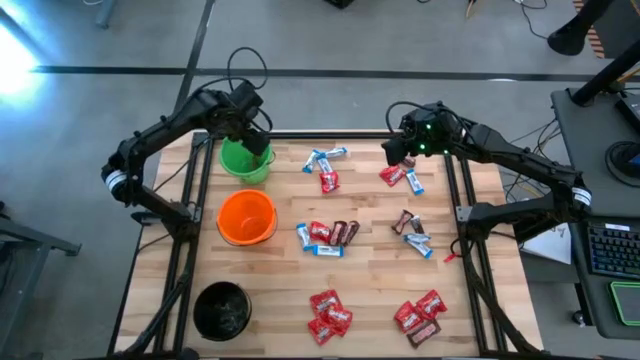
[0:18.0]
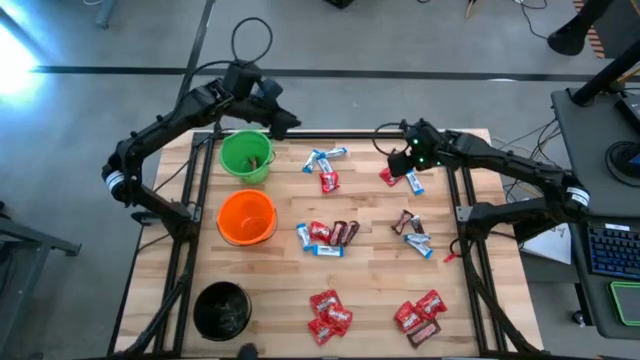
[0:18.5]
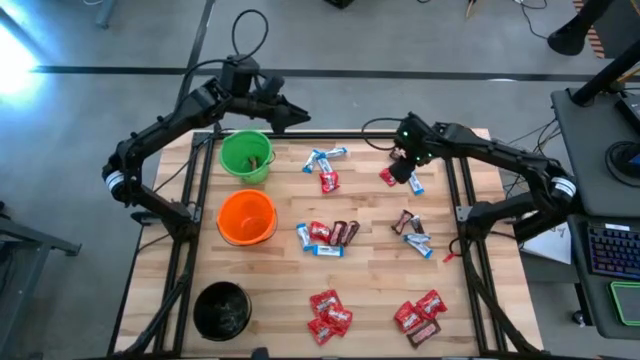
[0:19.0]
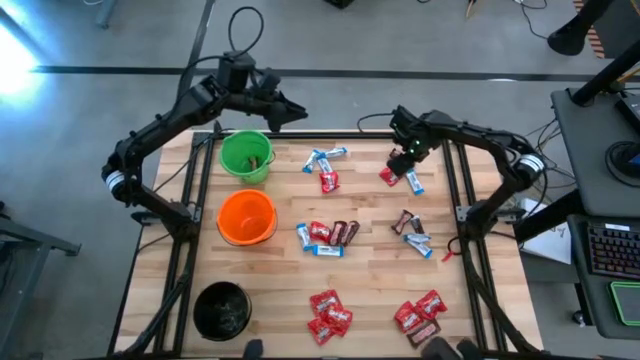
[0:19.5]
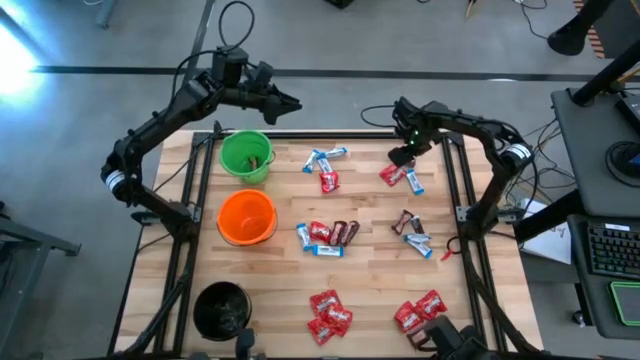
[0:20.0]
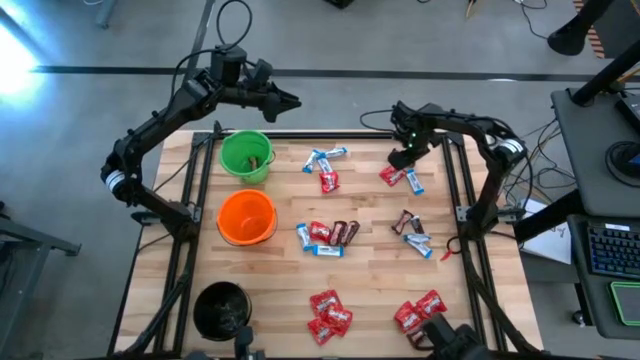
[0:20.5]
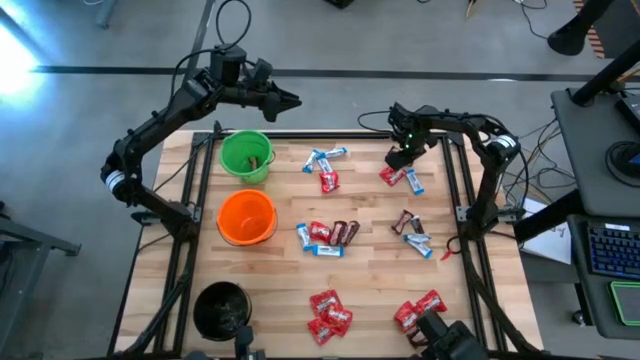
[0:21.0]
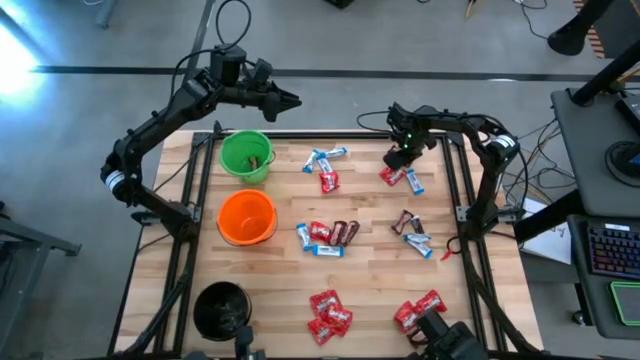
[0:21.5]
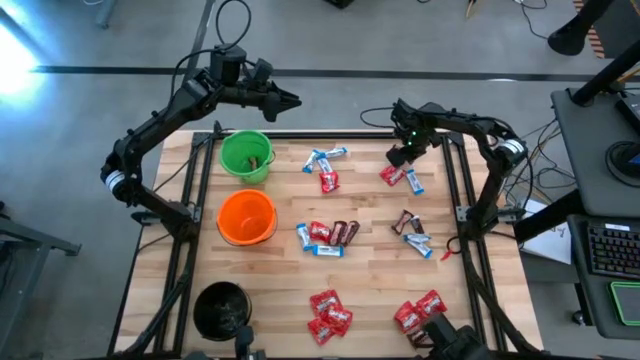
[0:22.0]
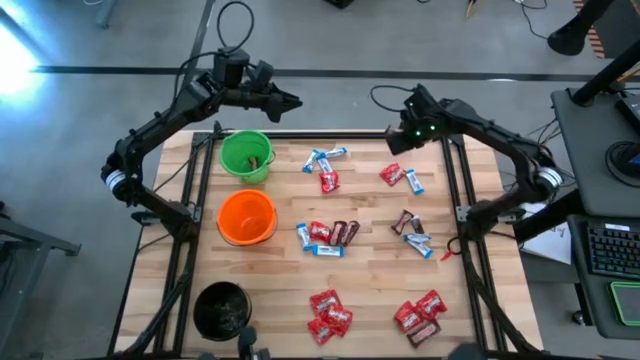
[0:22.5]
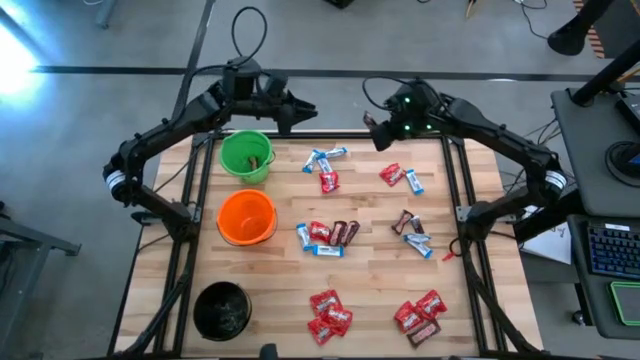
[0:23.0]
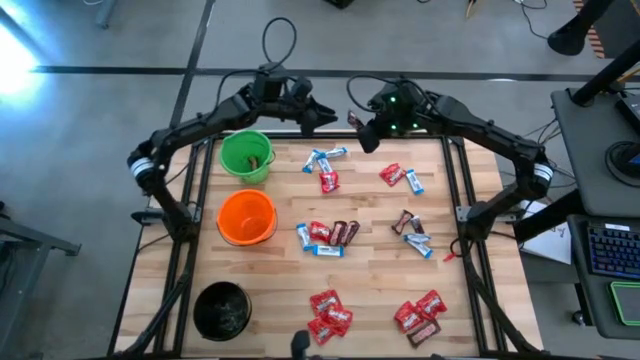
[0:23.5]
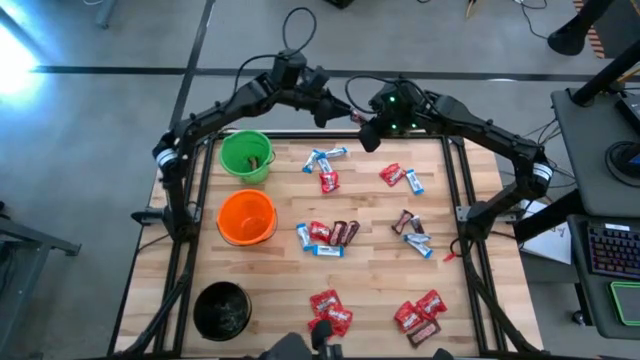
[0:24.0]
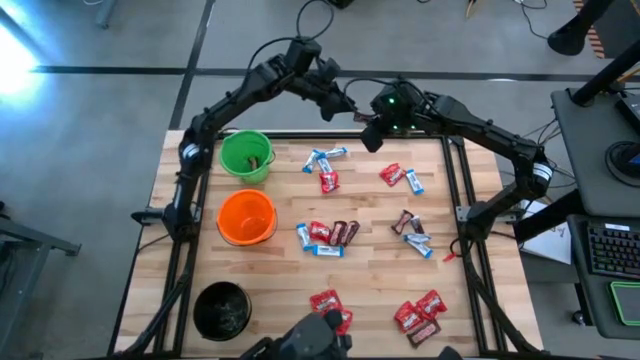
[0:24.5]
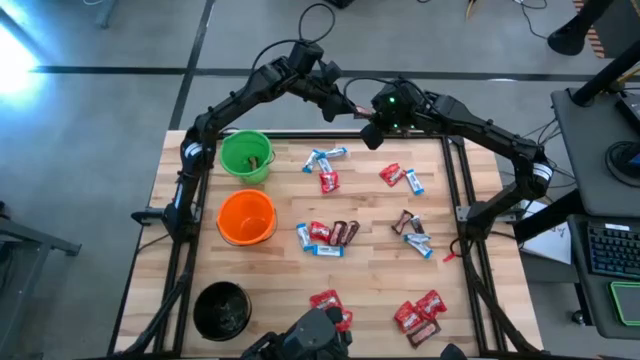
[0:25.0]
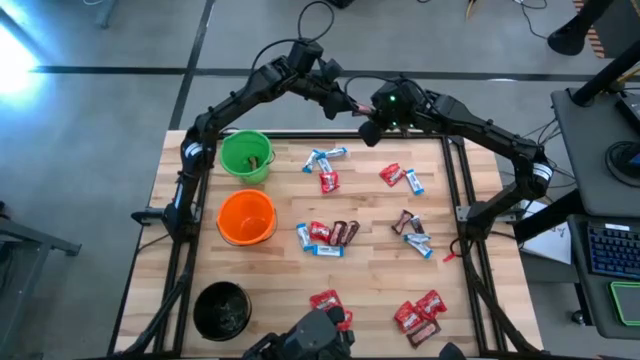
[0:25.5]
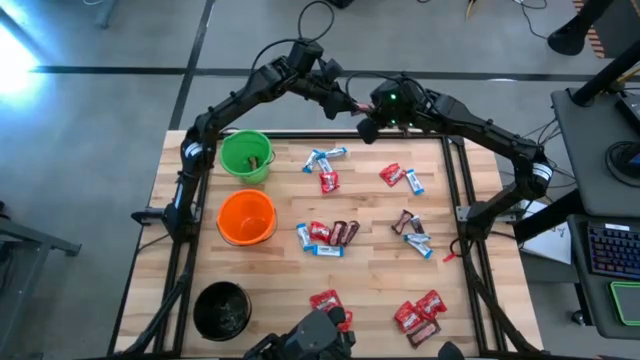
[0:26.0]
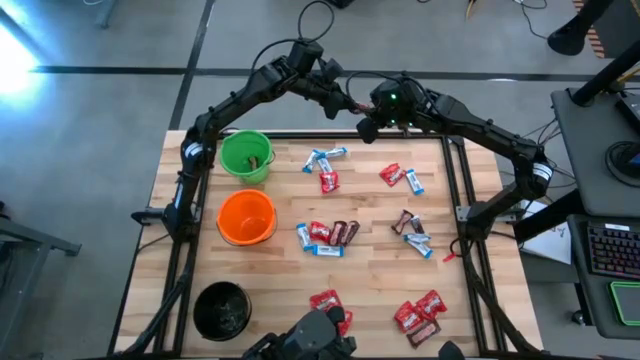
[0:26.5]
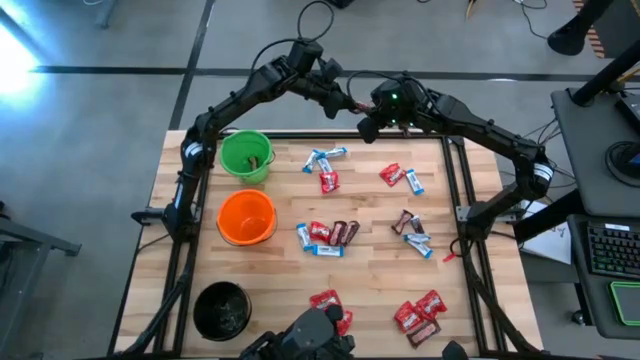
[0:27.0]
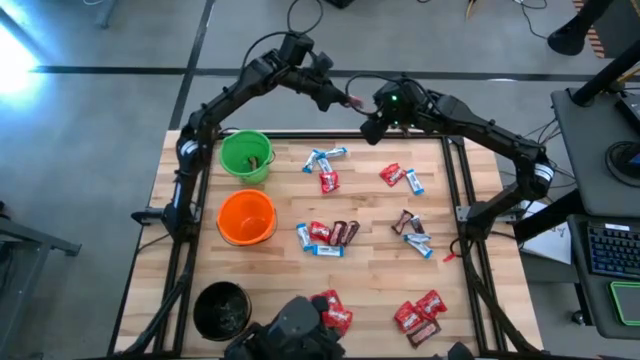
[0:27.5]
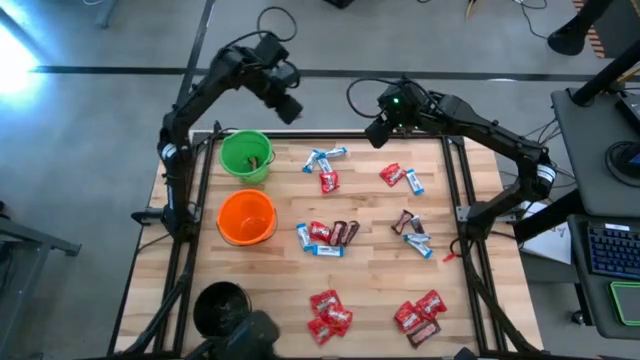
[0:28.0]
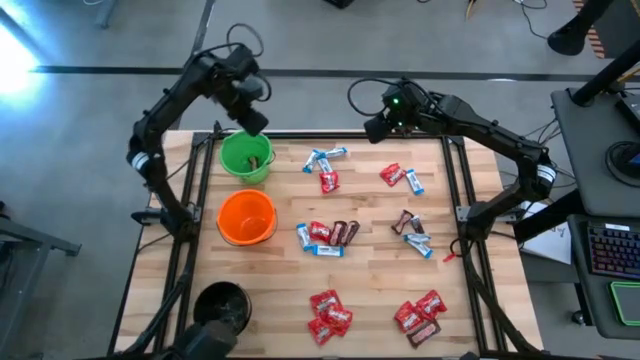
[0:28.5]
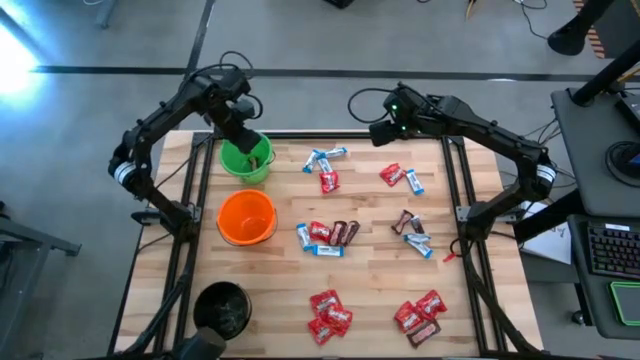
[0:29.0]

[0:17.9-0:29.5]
Task: Organize candy in baskets
Put the brown chocolate into the green bucket

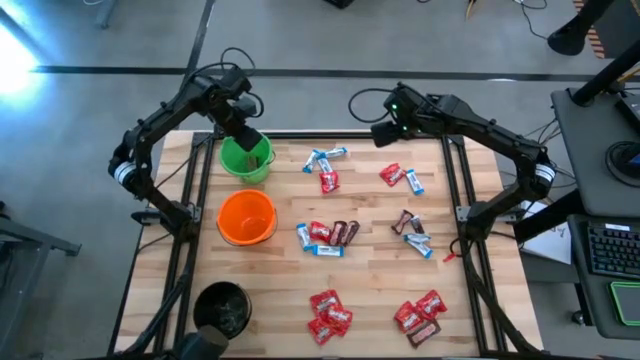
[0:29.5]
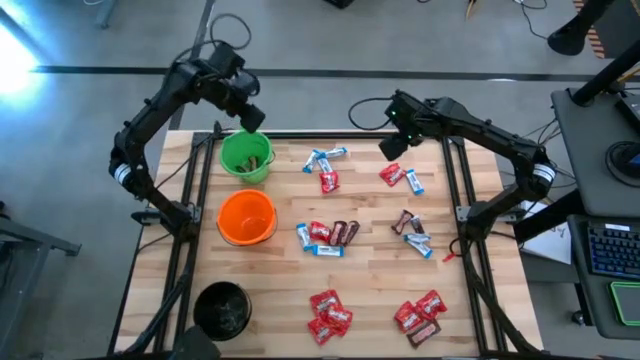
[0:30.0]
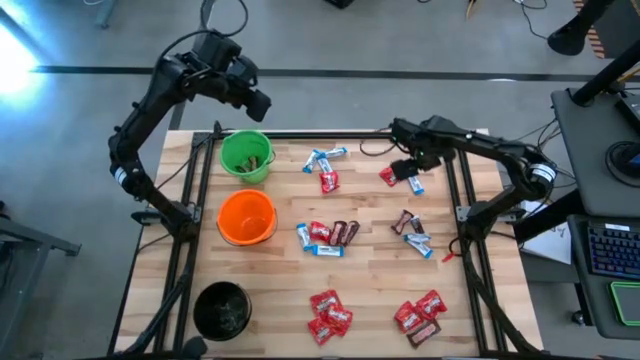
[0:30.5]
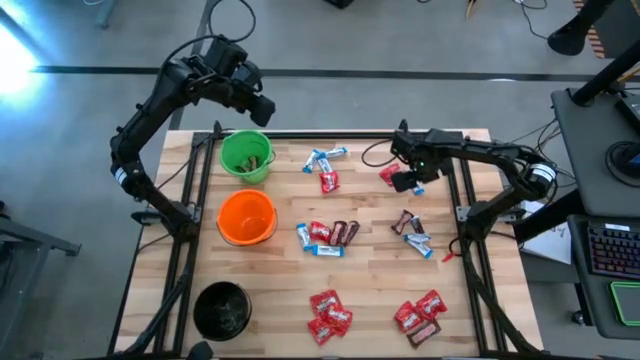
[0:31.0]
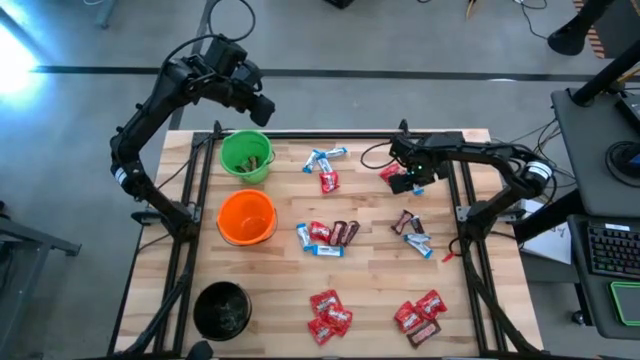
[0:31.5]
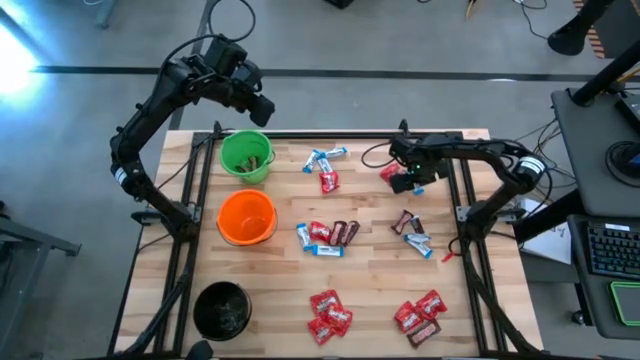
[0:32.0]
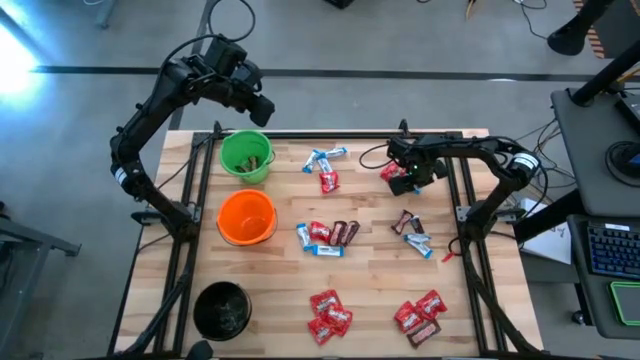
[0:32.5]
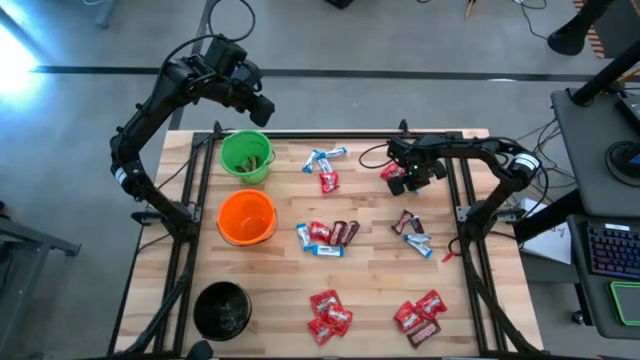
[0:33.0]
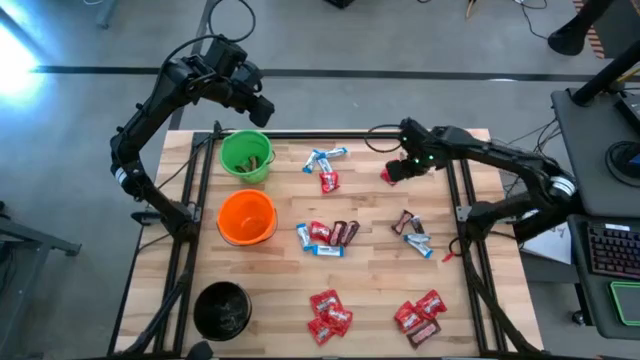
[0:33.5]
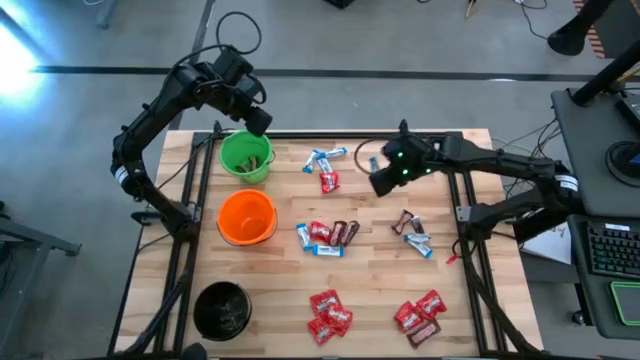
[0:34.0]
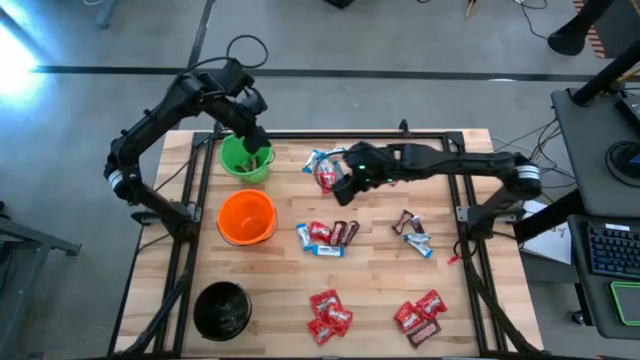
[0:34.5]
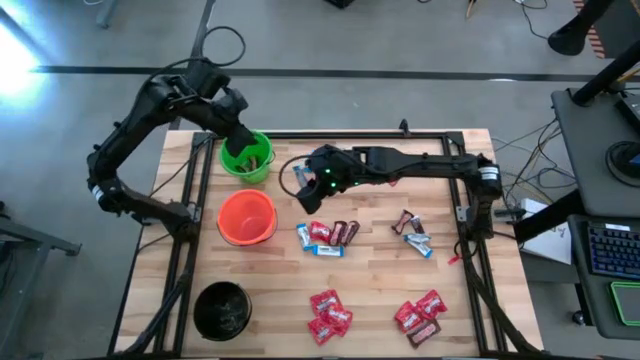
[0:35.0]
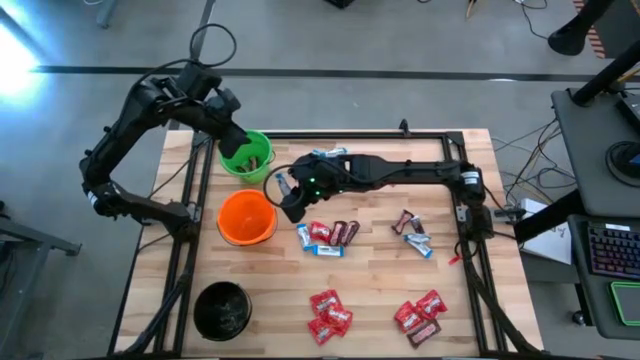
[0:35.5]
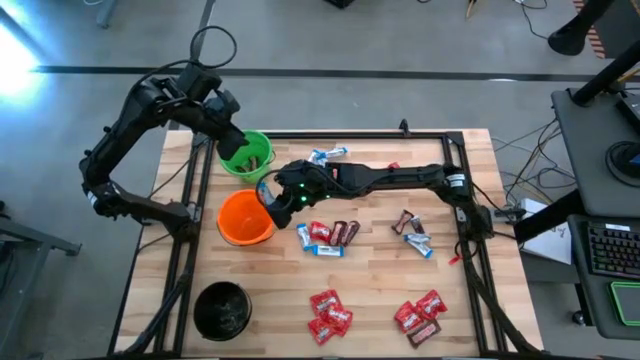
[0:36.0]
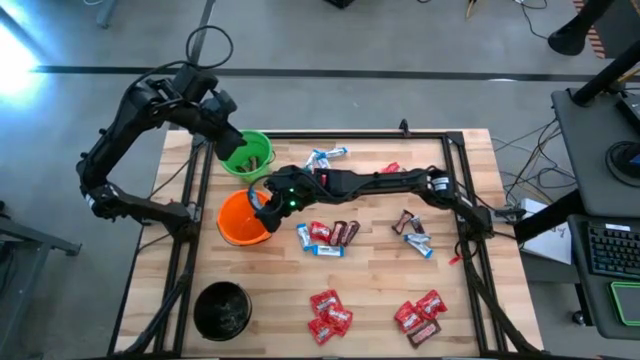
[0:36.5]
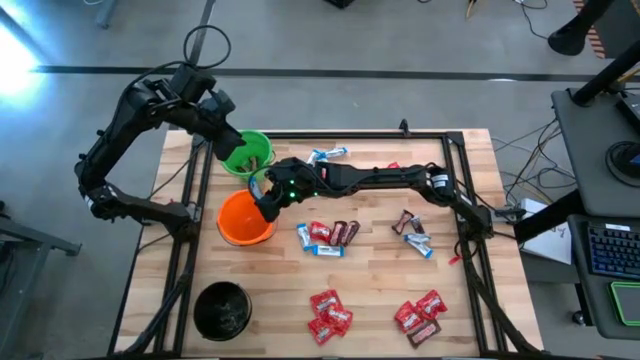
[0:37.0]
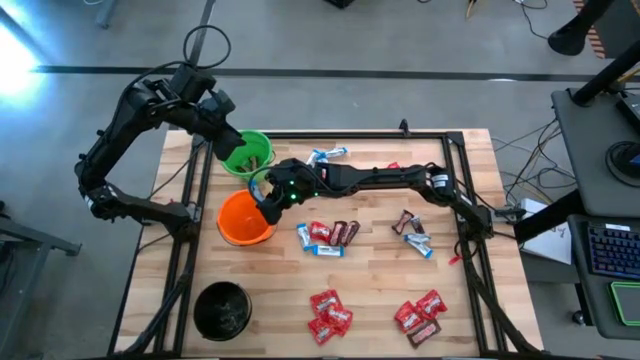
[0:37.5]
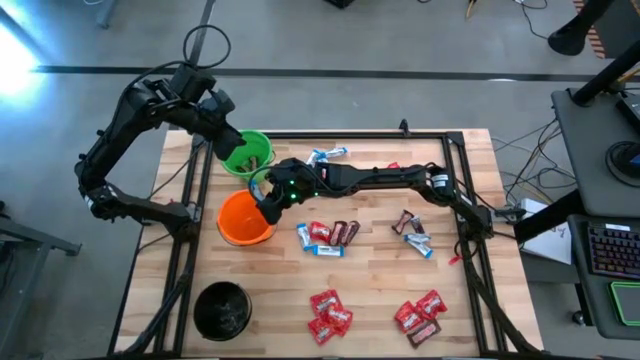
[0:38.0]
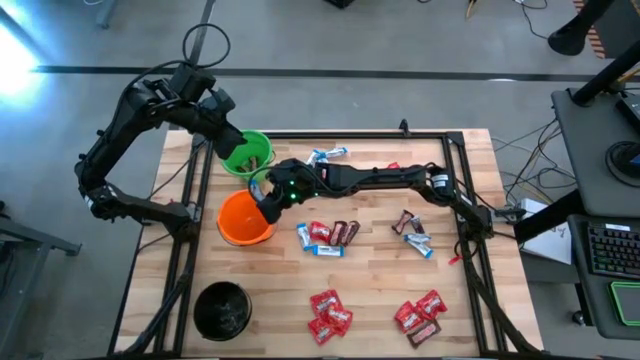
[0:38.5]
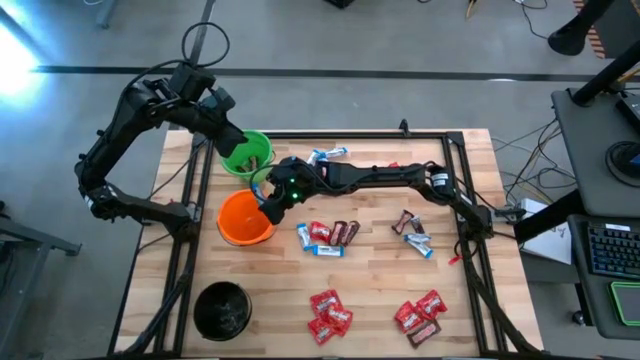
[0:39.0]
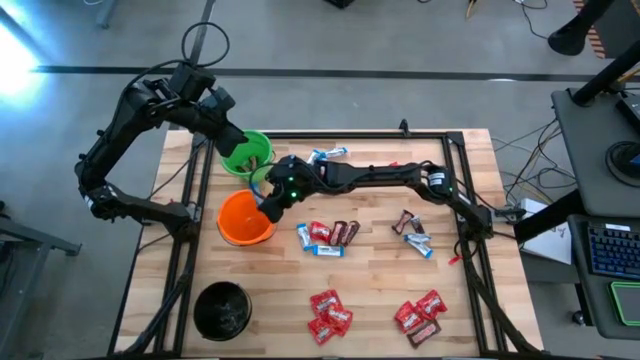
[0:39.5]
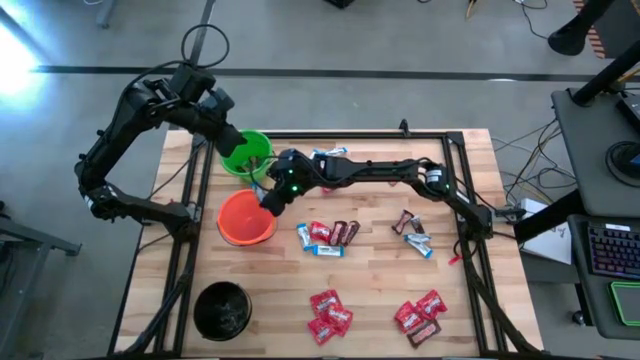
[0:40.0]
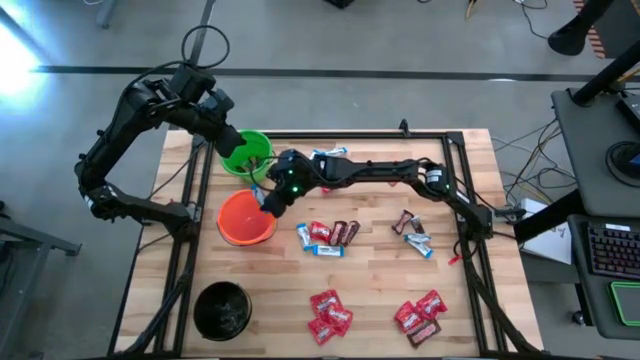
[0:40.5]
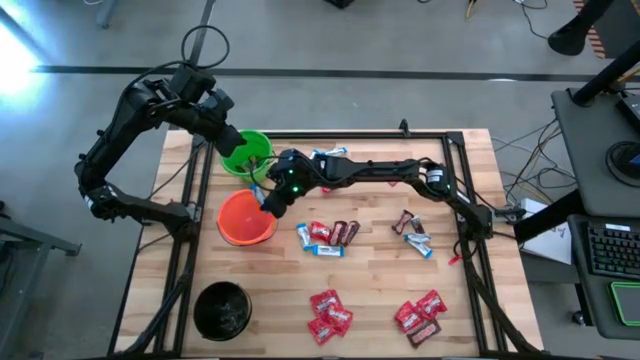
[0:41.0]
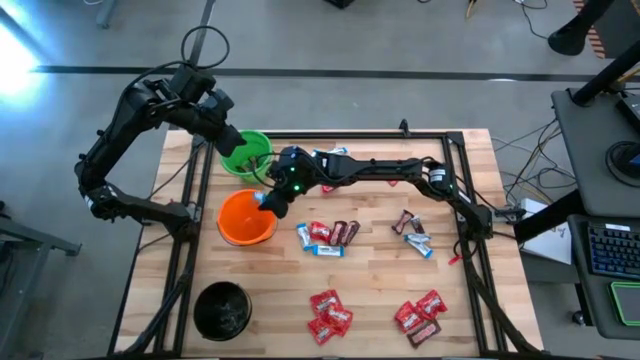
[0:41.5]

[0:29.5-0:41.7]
Put the white chocolate into the orange bucket
